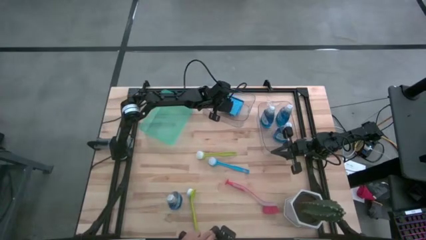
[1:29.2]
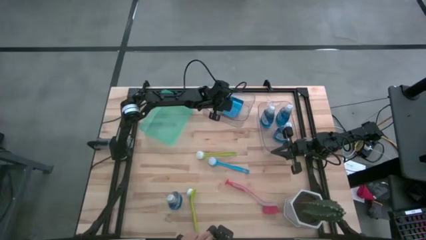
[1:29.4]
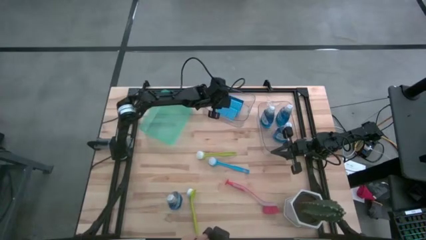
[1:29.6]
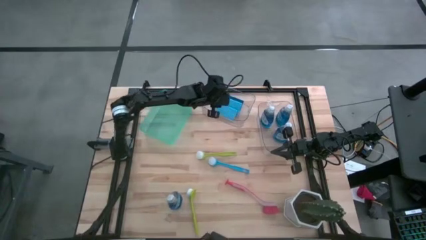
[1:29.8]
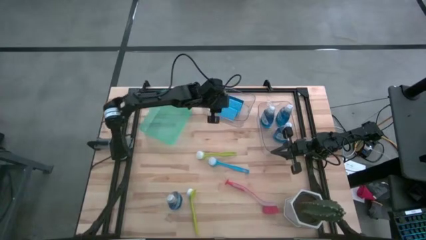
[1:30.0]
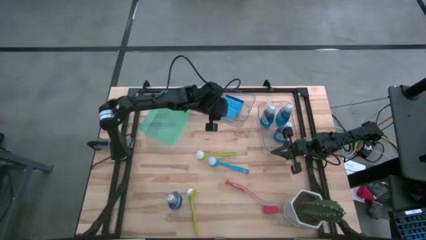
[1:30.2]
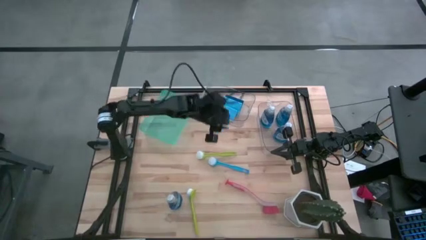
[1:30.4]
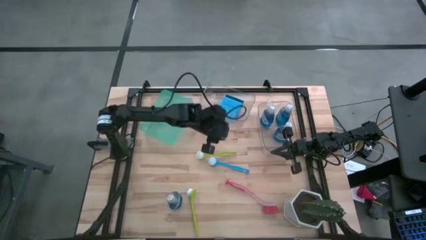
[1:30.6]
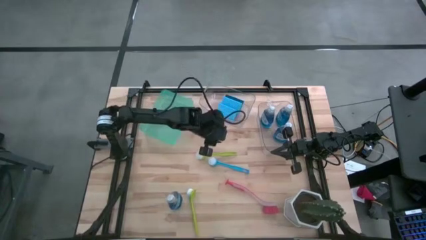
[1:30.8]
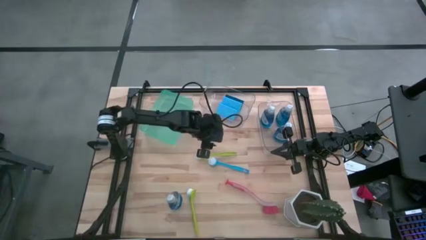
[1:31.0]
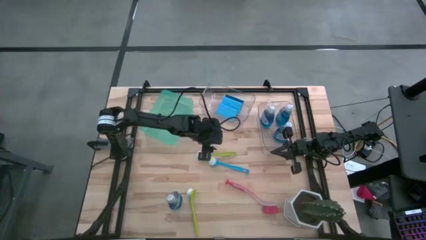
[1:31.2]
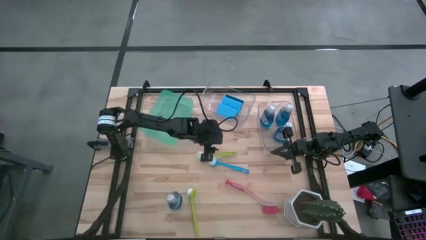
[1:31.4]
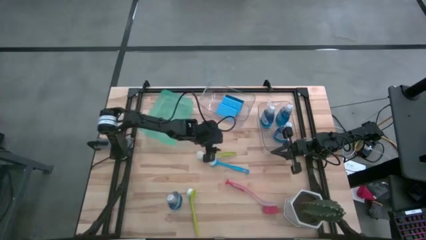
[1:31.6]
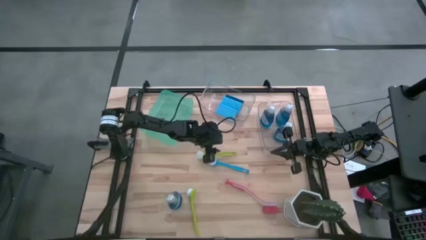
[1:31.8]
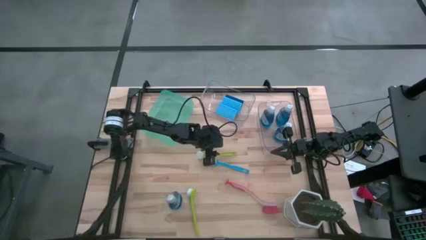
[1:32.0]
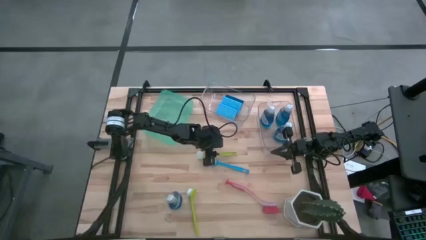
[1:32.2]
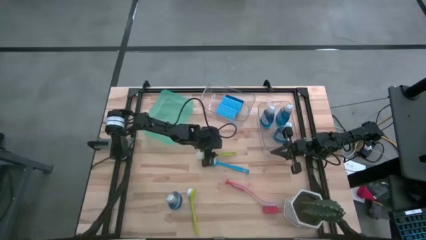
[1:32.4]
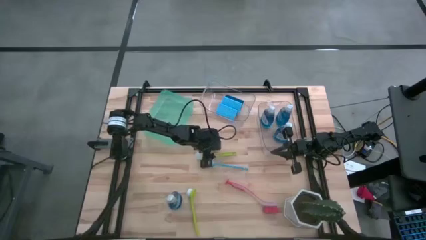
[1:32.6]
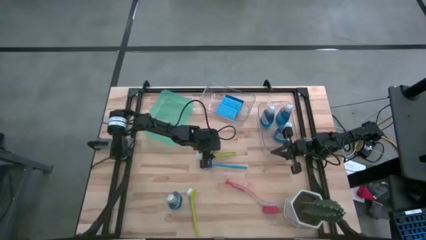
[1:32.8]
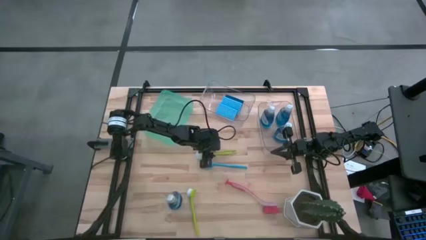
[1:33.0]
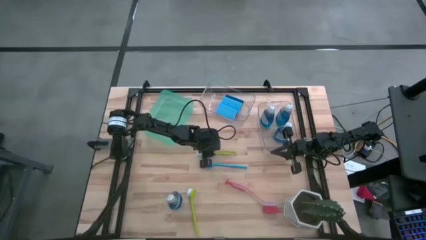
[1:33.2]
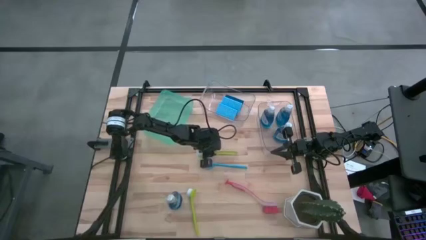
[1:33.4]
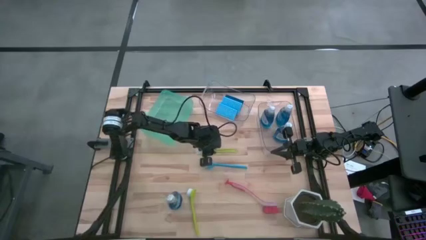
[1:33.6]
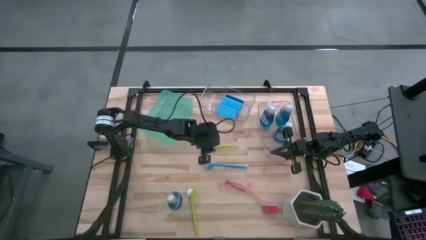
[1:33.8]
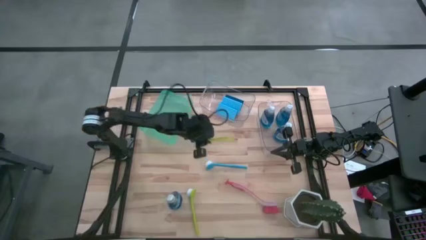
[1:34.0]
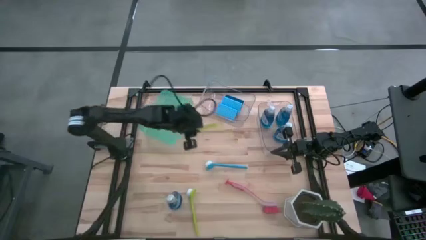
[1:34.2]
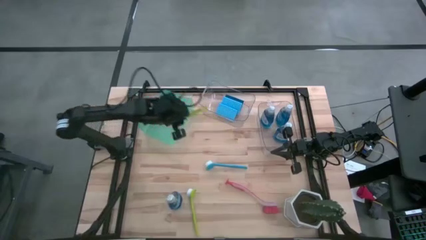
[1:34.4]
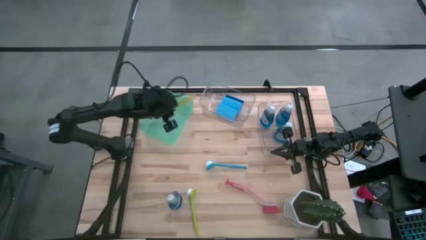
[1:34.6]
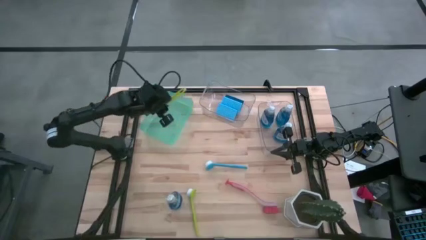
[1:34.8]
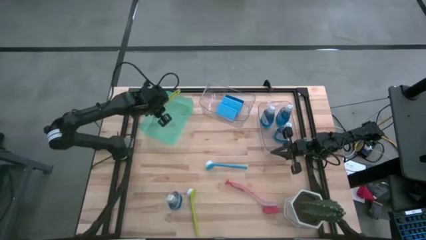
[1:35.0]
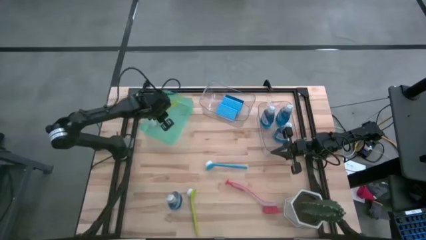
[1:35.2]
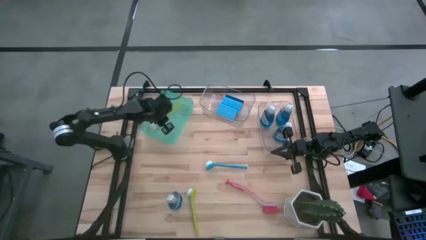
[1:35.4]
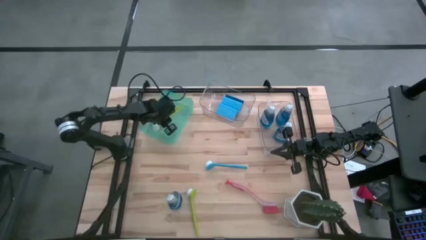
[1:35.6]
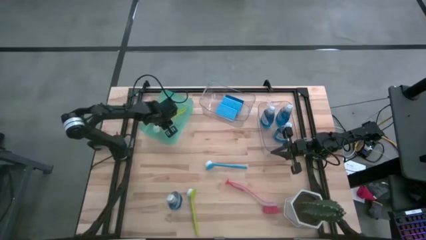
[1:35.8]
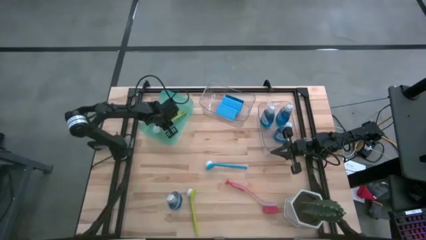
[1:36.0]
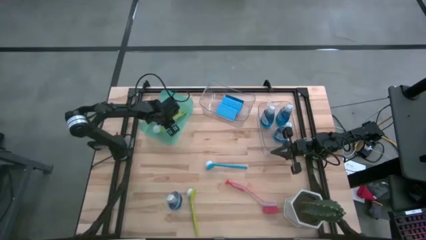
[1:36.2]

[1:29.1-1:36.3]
Task: Pick & Place Kitchen Sink Supplies
Put the green dishwashing brush into the light blue bin

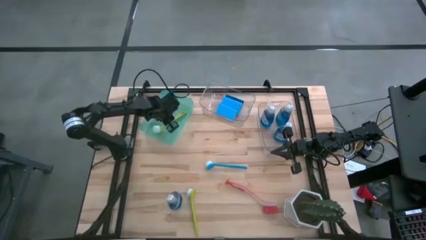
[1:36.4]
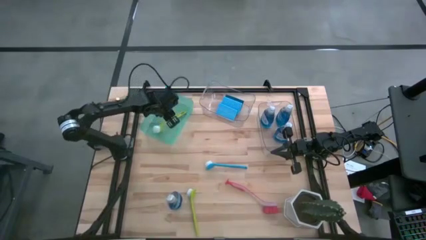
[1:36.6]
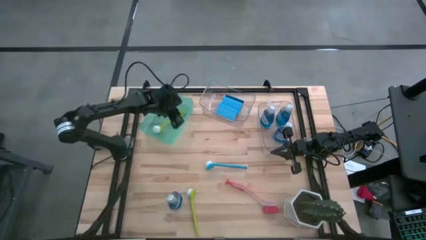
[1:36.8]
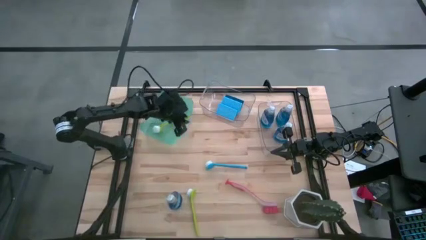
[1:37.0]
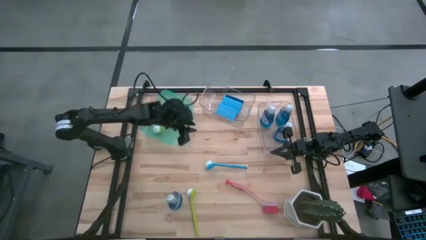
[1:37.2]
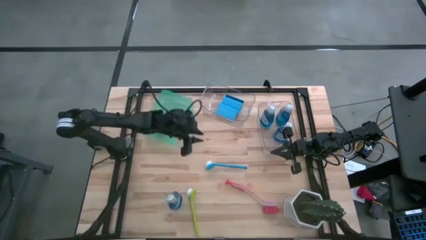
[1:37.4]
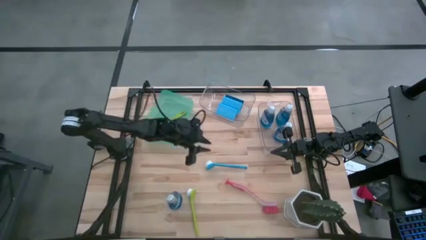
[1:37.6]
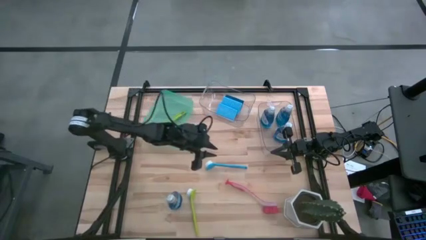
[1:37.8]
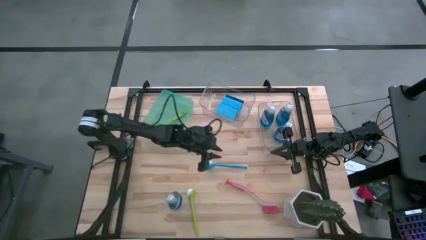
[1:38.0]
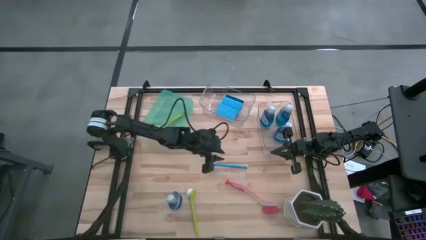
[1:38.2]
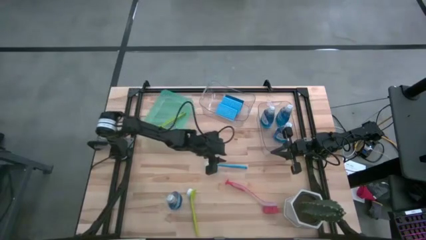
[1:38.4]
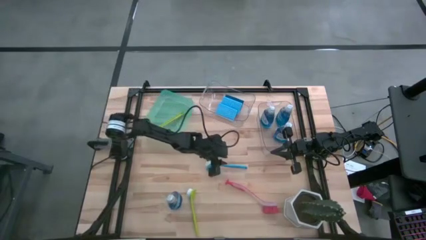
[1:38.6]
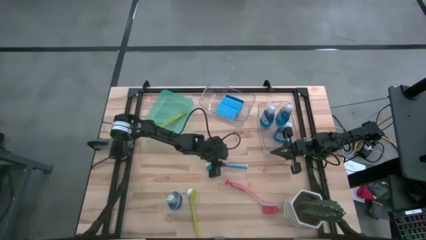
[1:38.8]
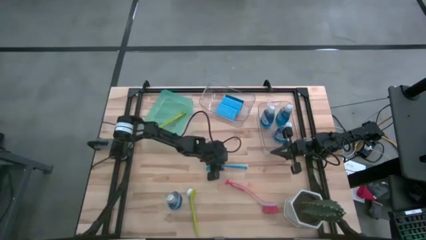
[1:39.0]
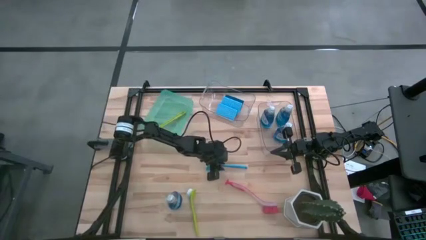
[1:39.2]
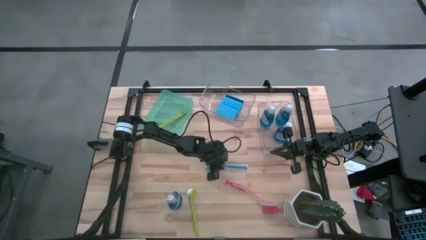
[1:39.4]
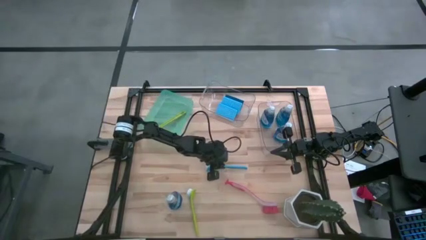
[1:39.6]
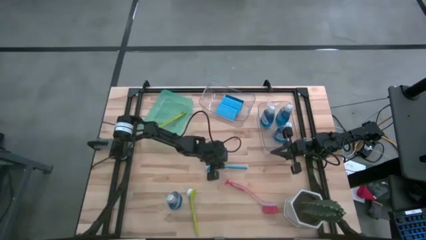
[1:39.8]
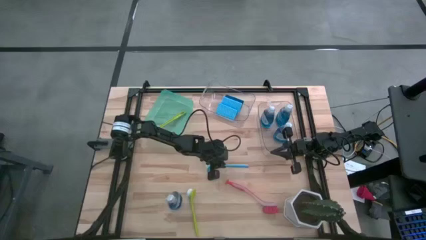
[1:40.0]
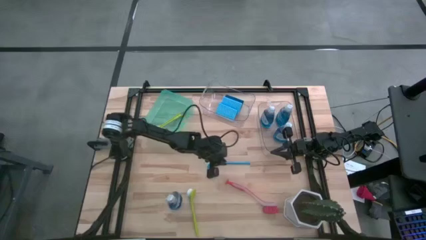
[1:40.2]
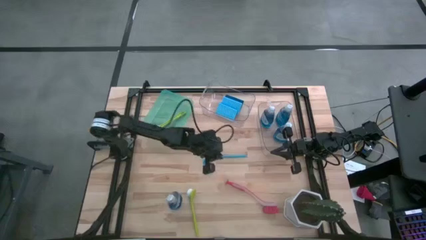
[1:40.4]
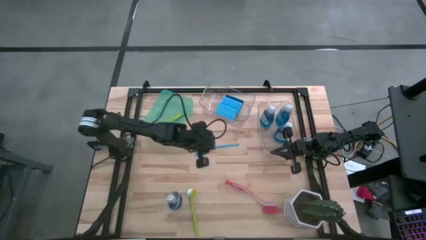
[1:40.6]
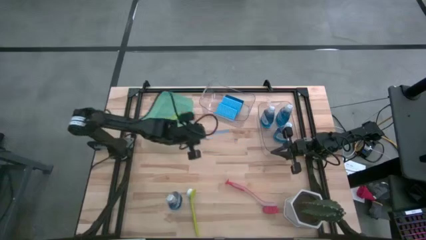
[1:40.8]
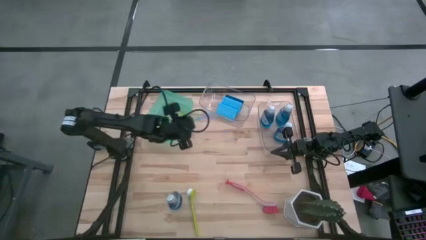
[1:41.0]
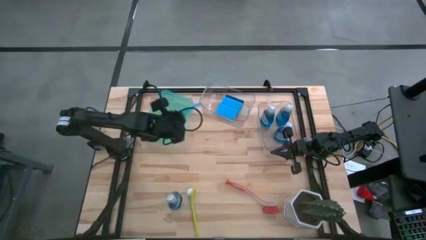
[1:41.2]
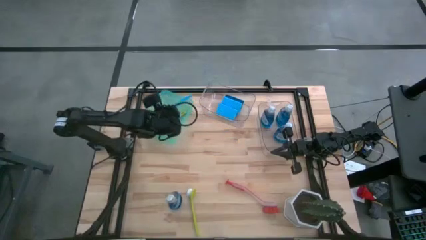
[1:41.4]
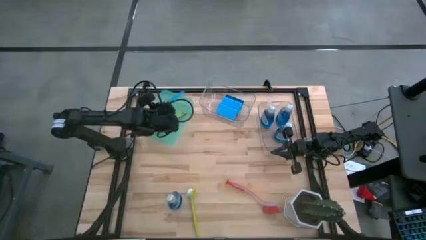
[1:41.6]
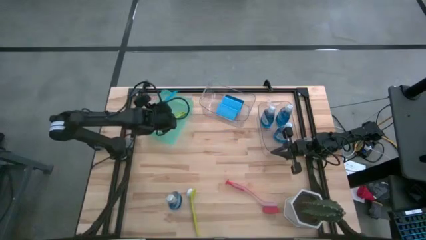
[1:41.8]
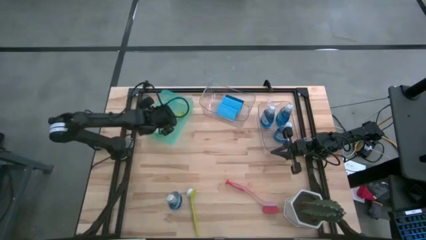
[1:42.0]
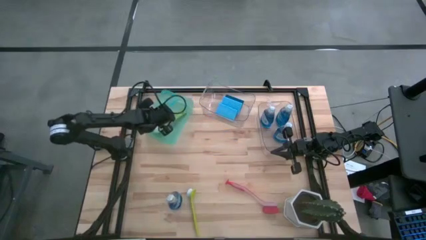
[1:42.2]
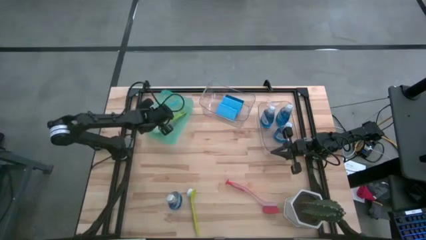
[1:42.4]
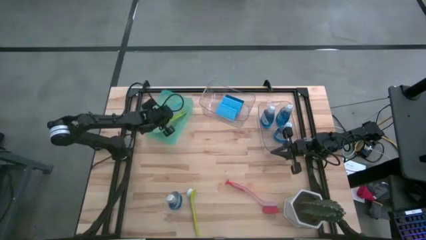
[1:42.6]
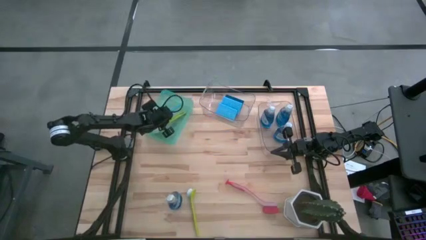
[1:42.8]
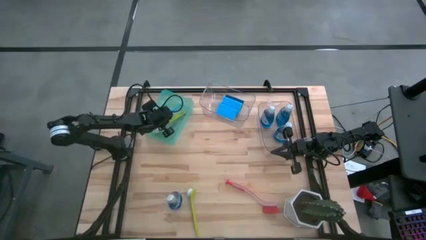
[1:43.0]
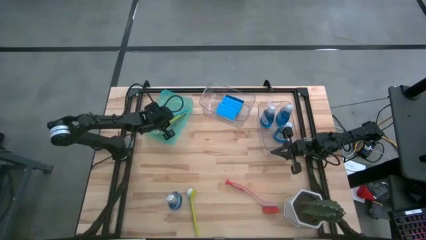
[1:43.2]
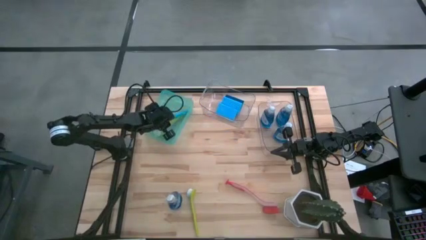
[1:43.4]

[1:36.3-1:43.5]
Put the blue dishwashing brush into the light blue bin
